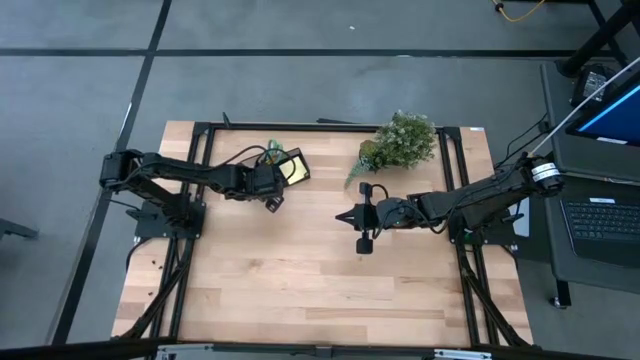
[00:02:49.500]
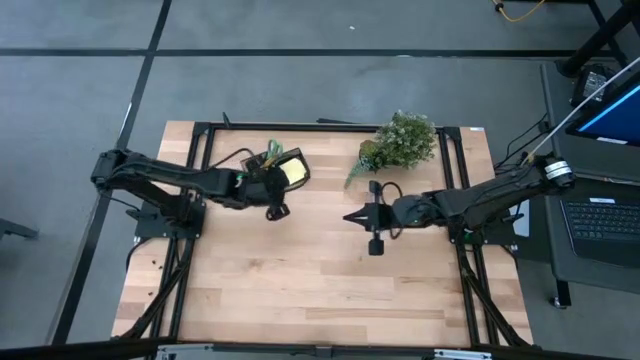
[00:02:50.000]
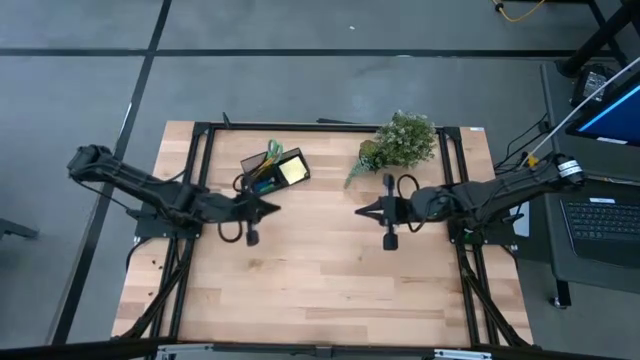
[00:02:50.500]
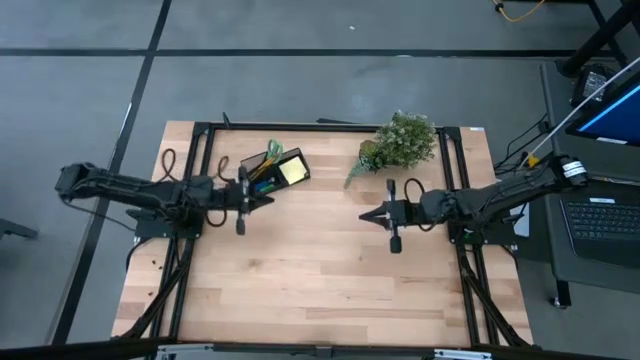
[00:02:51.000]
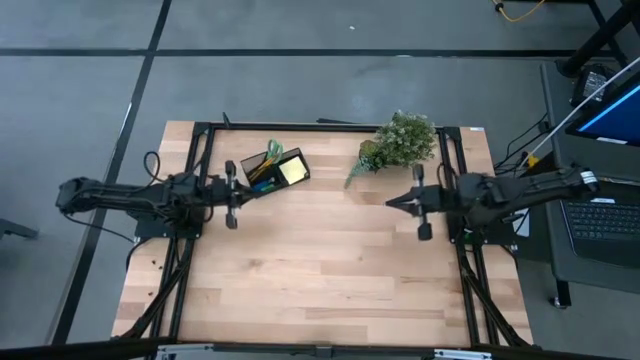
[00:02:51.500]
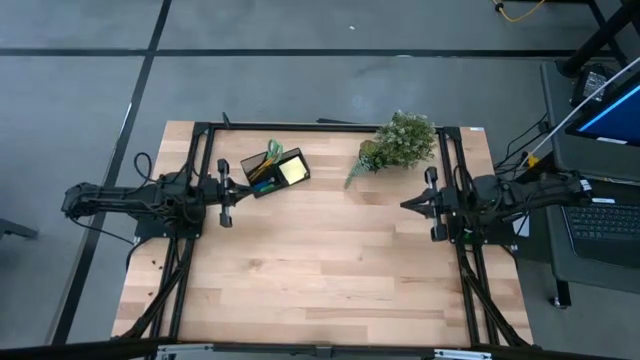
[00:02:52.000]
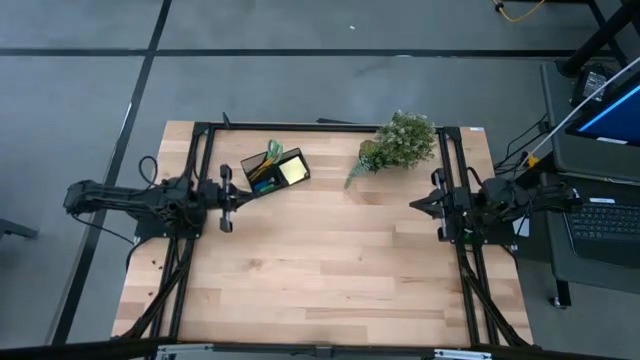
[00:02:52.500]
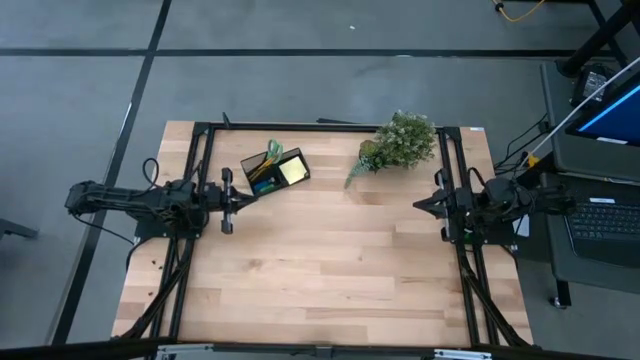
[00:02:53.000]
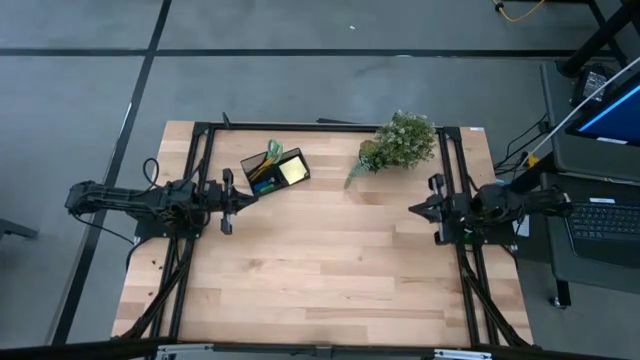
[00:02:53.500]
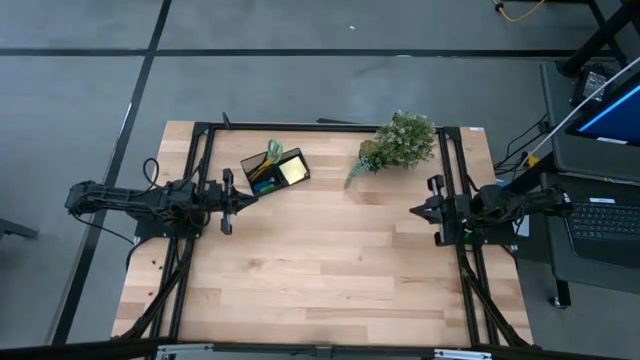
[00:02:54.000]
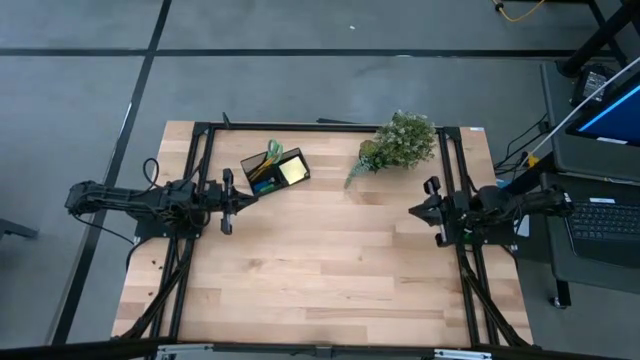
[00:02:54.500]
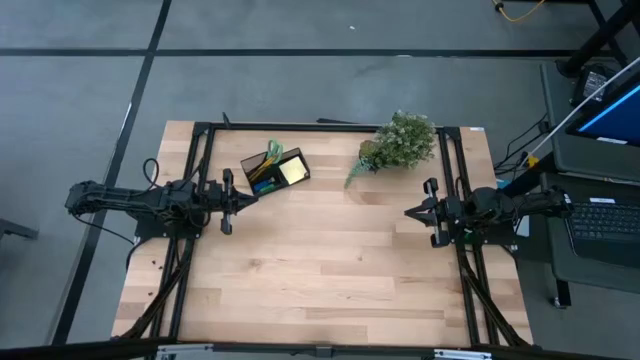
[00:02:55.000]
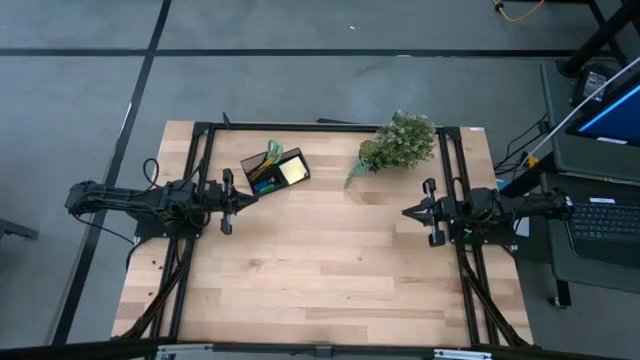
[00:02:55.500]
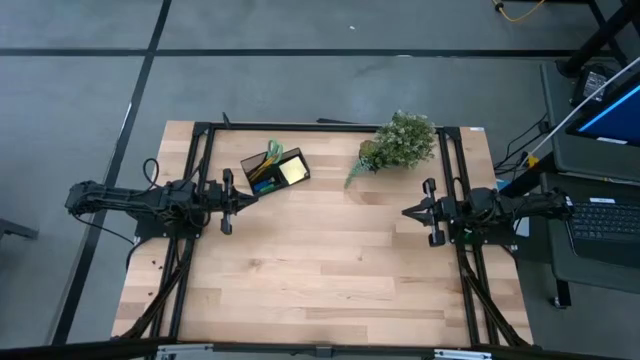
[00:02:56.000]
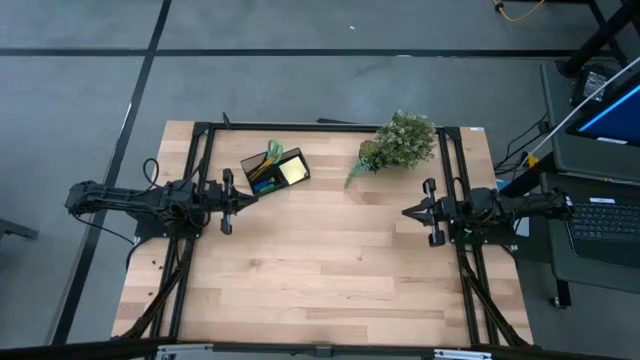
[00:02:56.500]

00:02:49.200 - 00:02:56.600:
Task: Pick and place office supplies into organizer
Return to Home Position

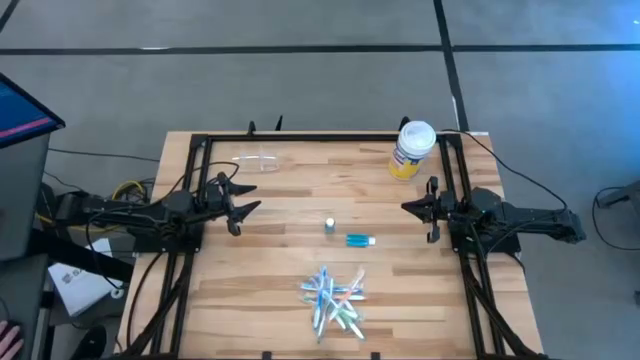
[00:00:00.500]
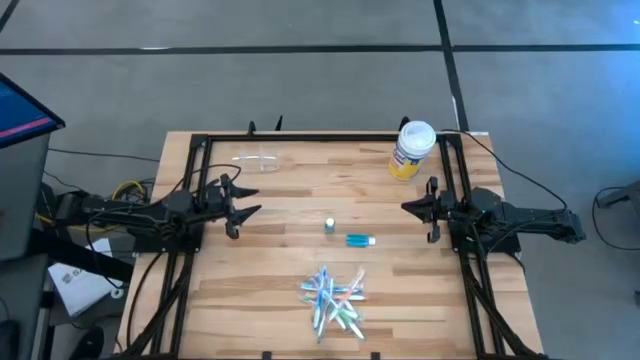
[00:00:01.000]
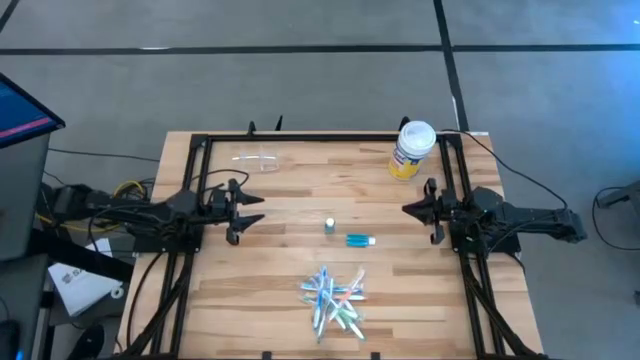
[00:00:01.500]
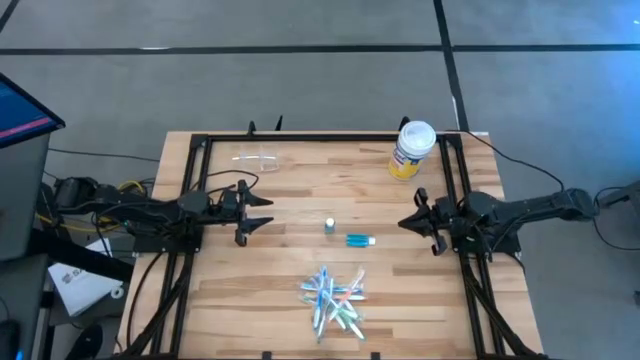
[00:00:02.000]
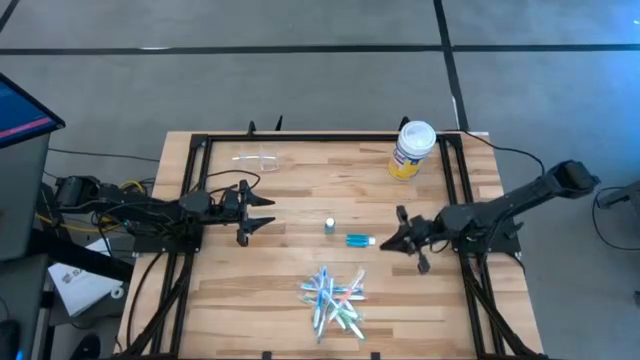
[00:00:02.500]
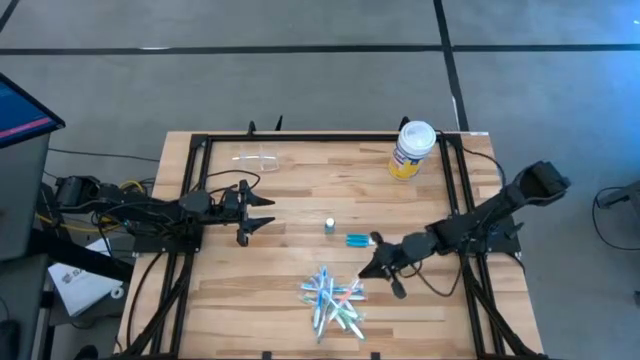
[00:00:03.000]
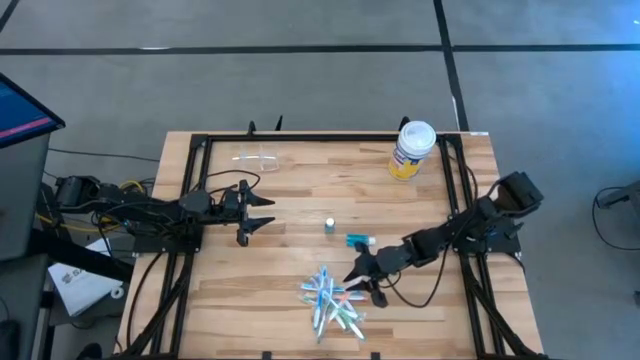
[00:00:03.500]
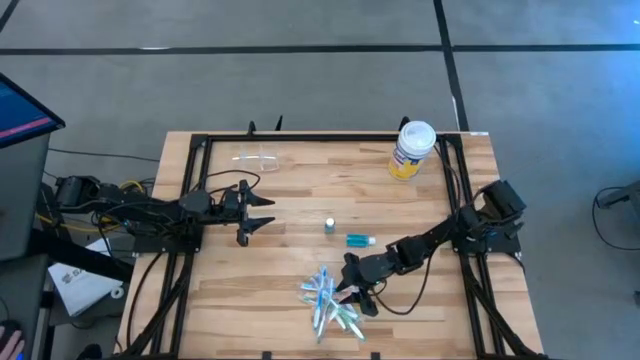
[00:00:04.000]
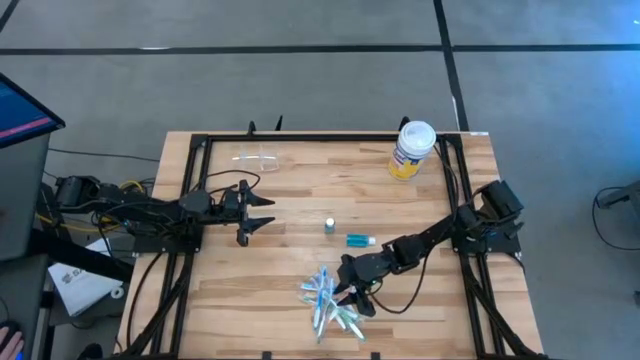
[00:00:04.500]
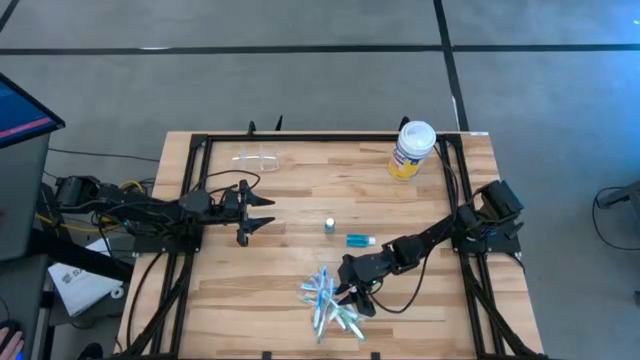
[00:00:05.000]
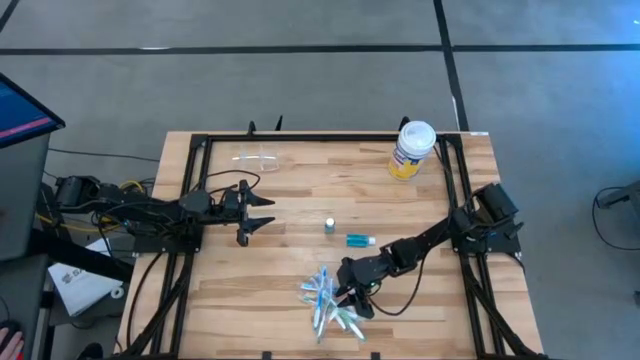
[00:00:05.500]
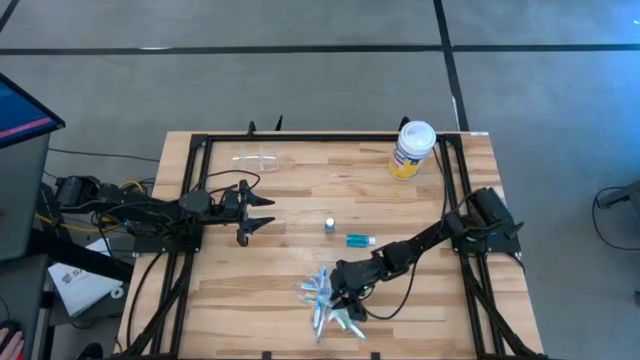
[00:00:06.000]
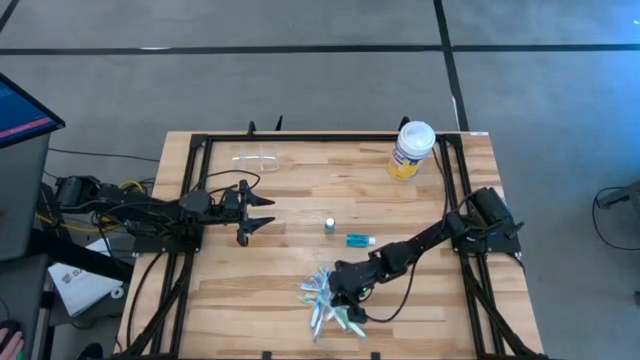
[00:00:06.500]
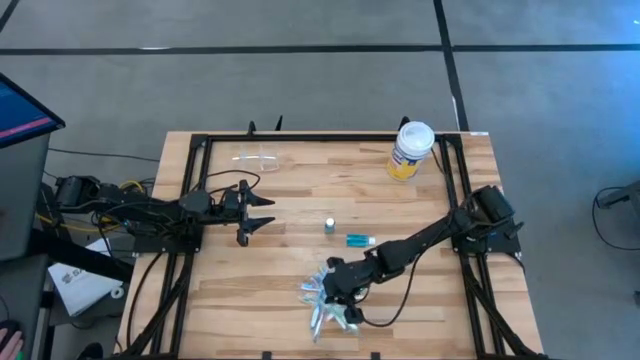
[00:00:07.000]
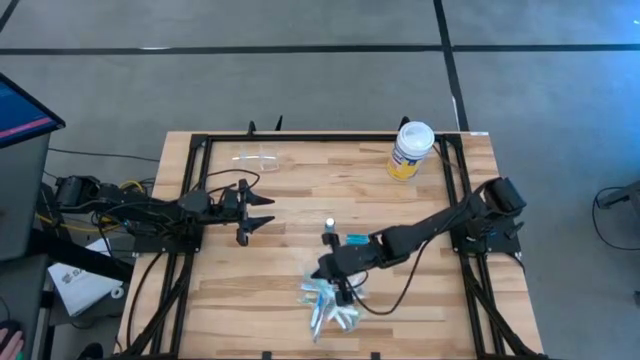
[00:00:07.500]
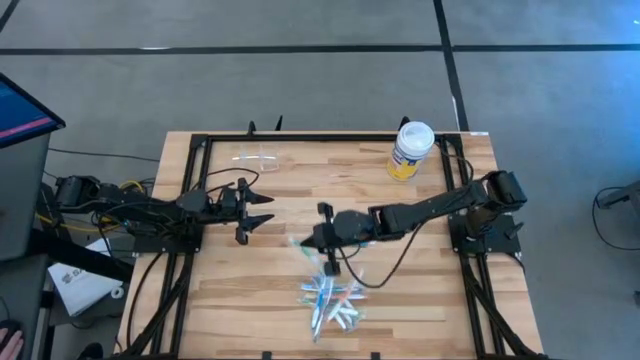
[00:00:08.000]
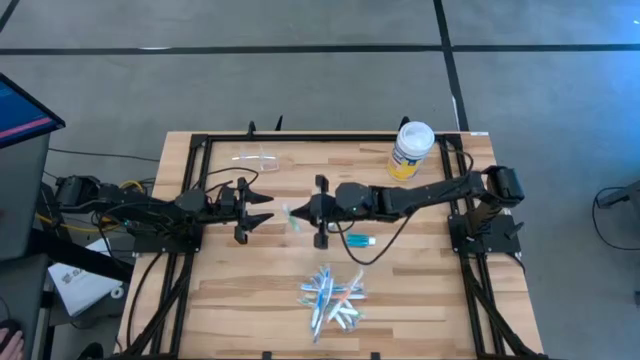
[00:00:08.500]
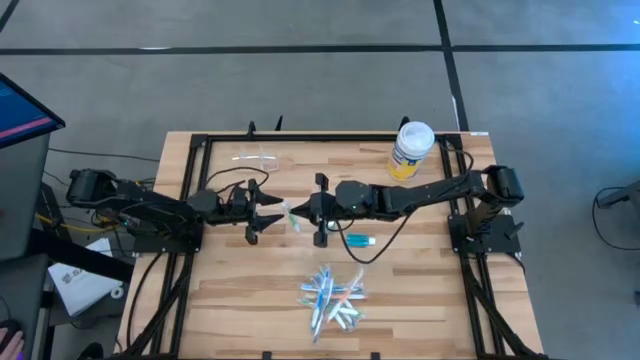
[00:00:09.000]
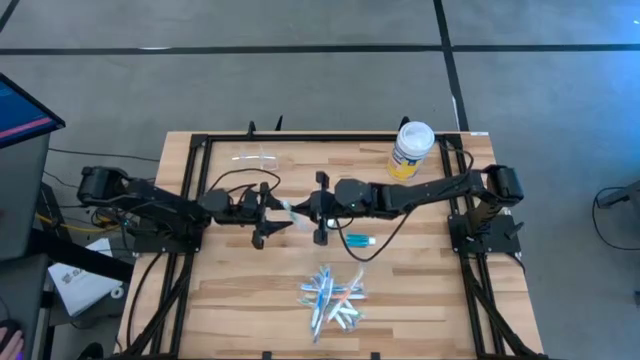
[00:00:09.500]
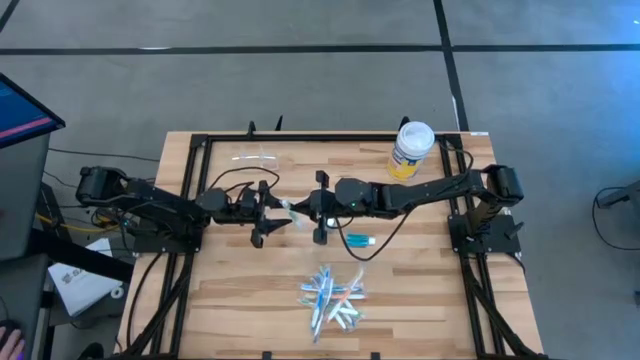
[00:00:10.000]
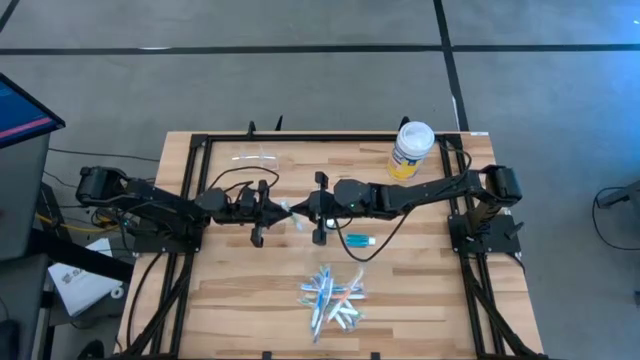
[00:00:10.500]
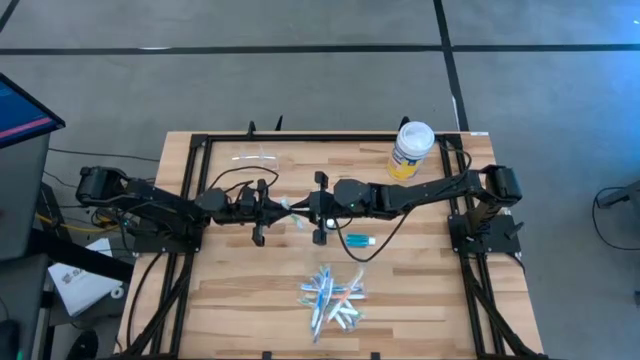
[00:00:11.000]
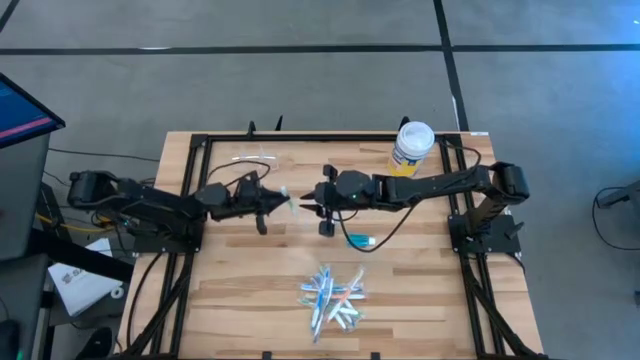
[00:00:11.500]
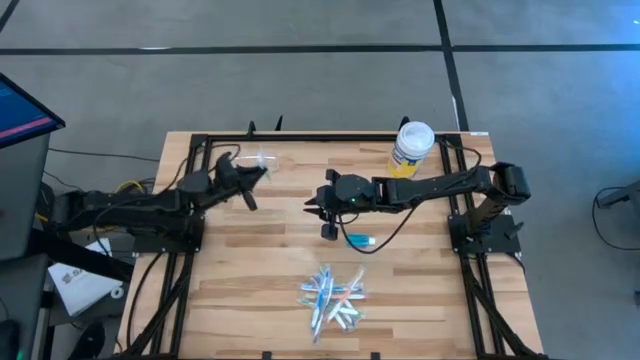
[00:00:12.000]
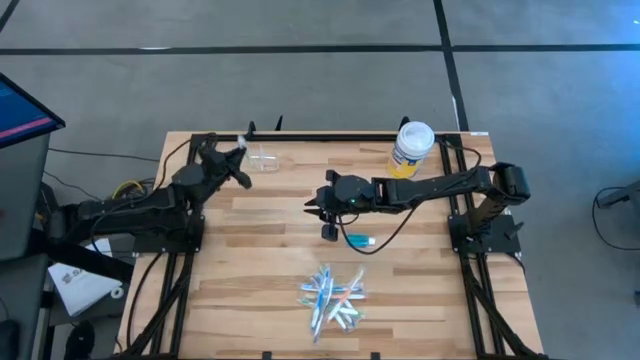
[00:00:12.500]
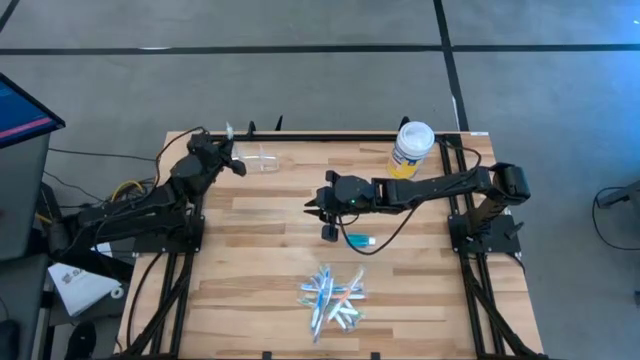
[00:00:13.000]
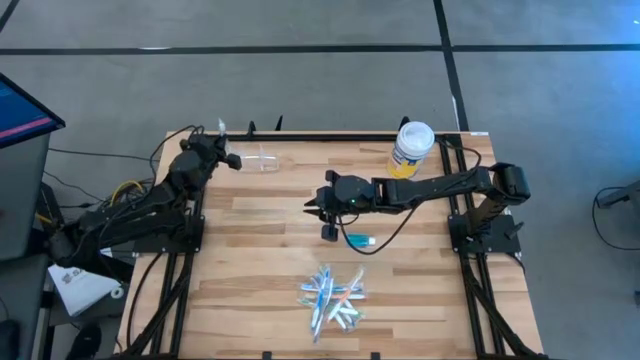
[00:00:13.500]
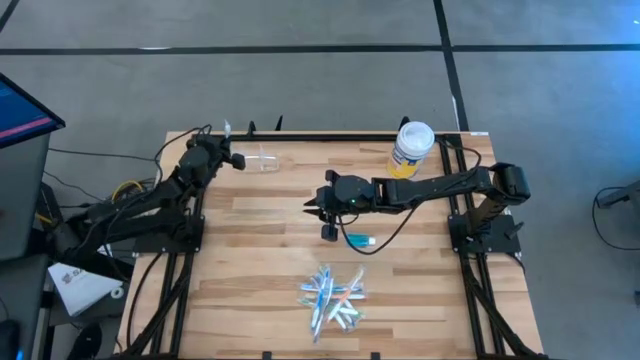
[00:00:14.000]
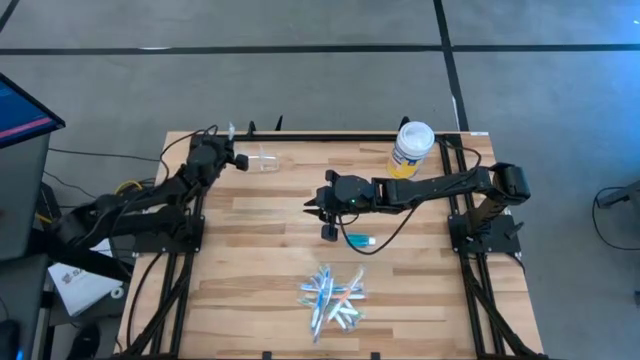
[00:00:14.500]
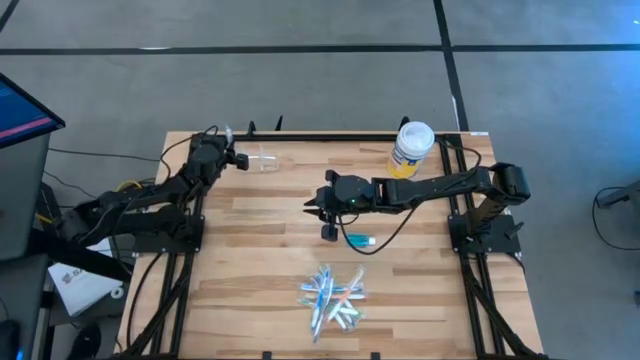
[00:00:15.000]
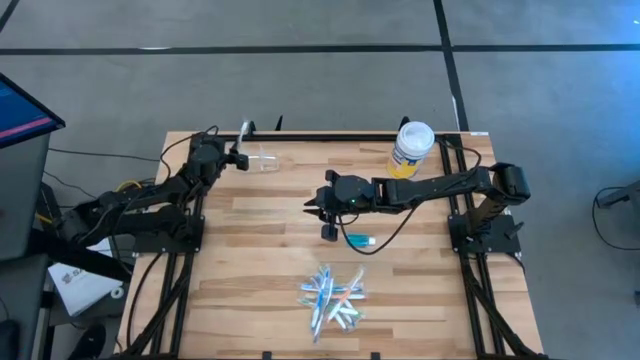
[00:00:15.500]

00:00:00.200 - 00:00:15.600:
Task: Pick & Place toothbrushing station
Put the green toothbrush into the transparent organizer
